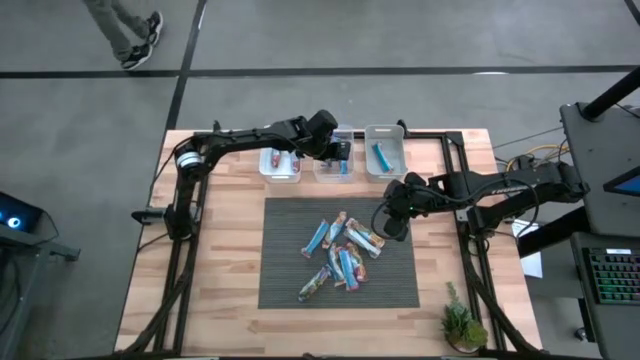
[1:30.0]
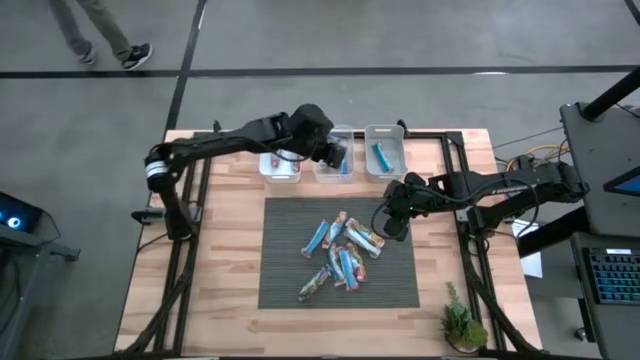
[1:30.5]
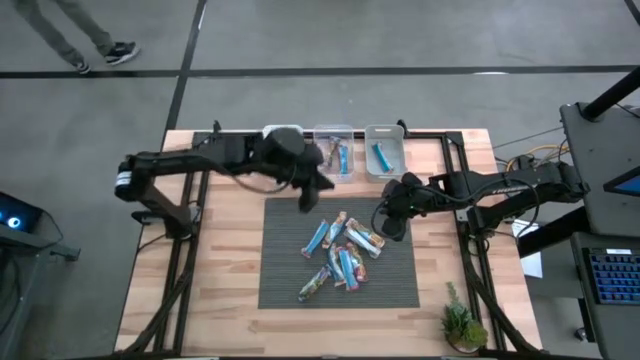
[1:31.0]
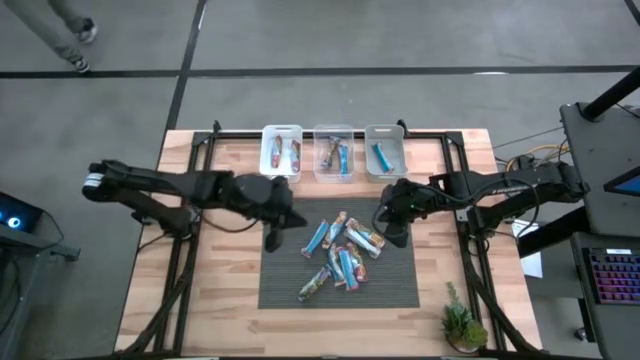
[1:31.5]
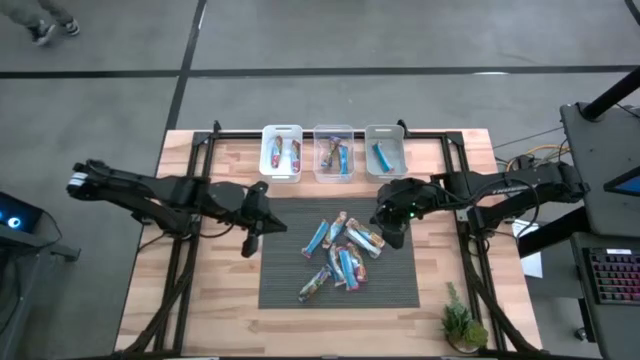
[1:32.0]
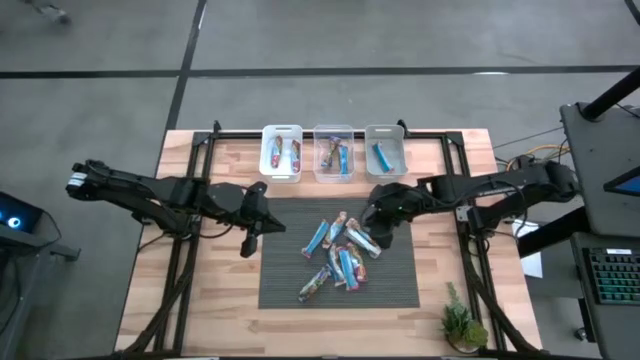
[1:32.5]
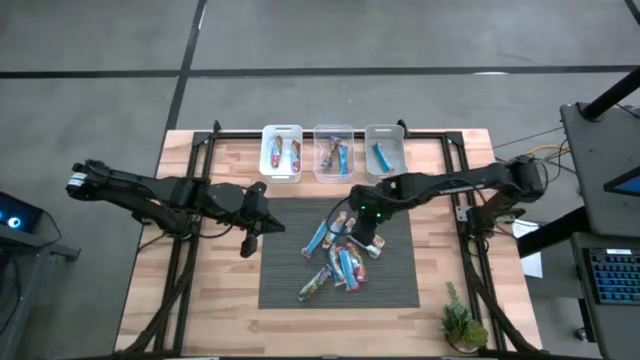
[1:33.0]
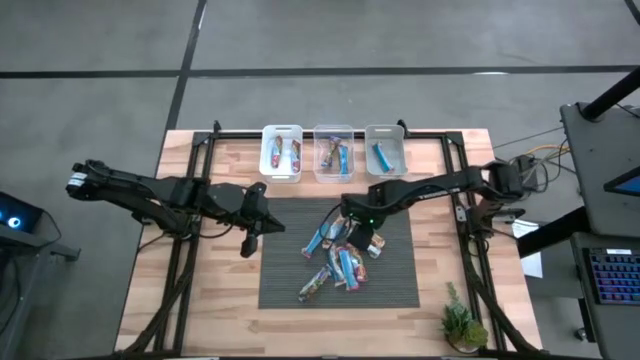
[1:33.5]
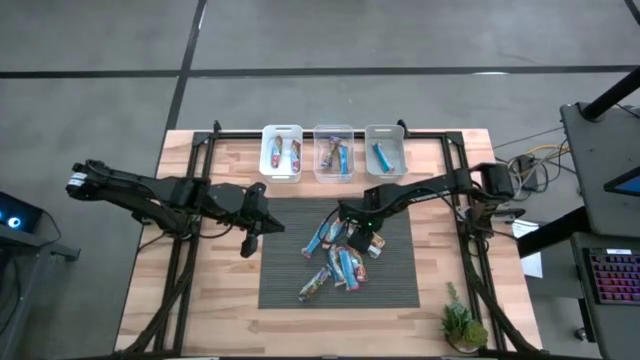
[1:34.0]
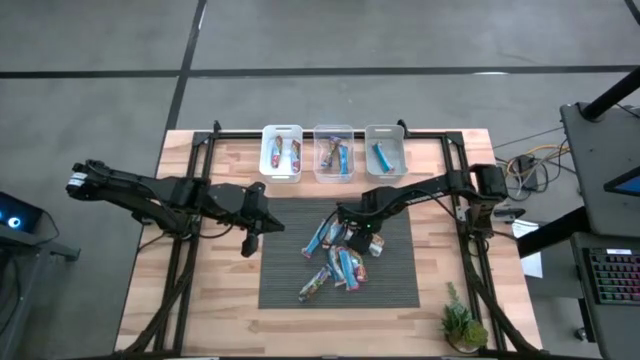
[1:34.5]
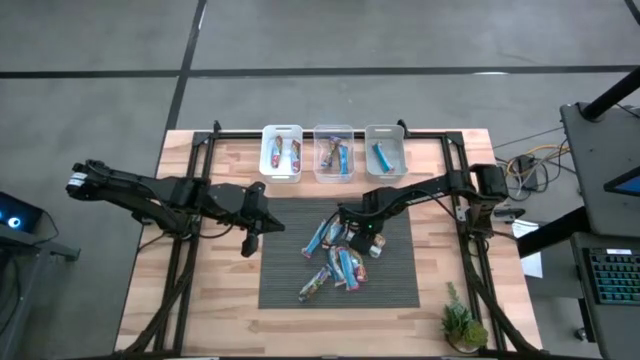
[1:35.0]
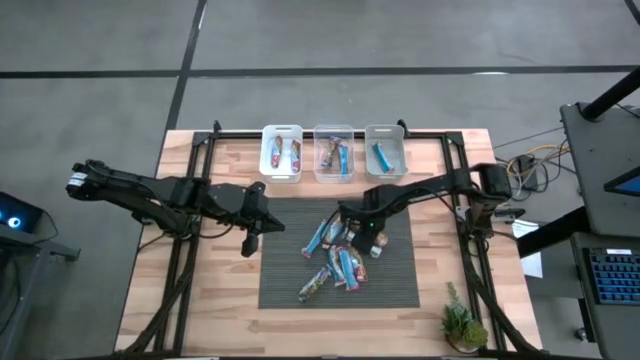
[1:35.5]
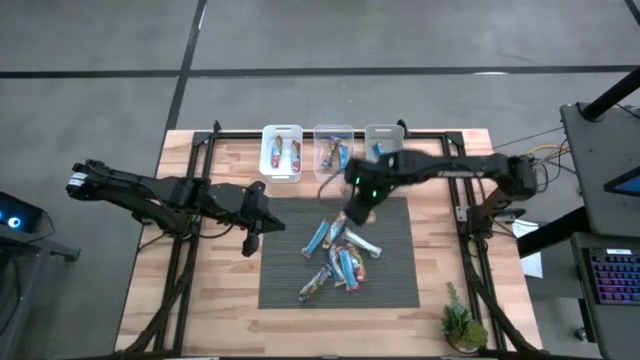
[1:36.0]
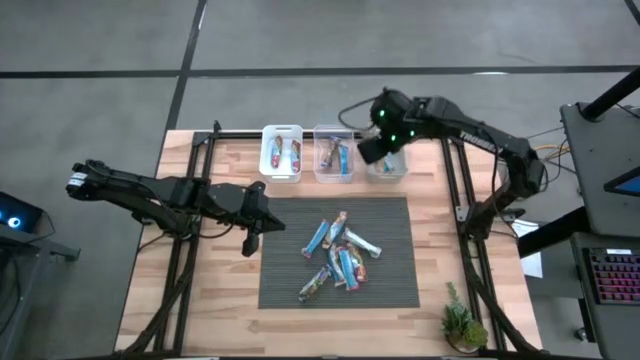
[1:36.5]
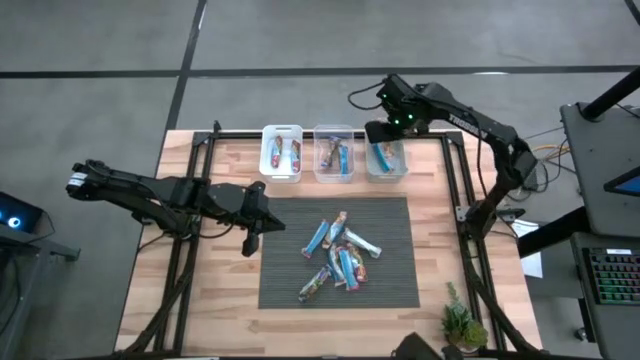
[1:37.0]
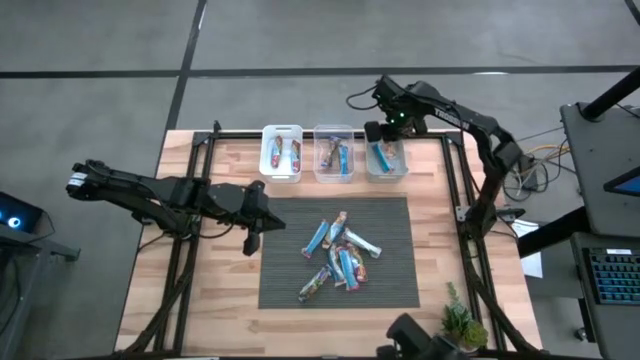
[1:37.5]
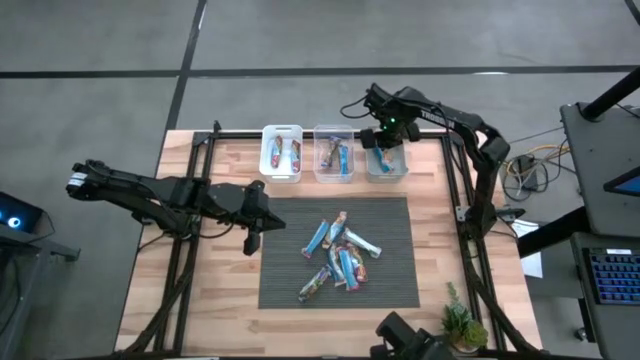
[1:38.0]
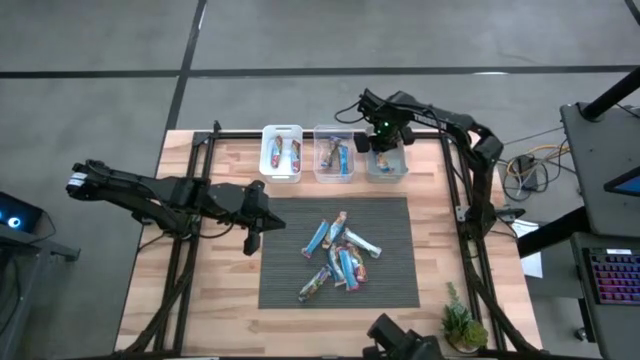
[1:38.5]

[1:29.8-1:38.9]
Task: Pick and place Granola Bars by type
Put the yellow granola bar into the gray bin

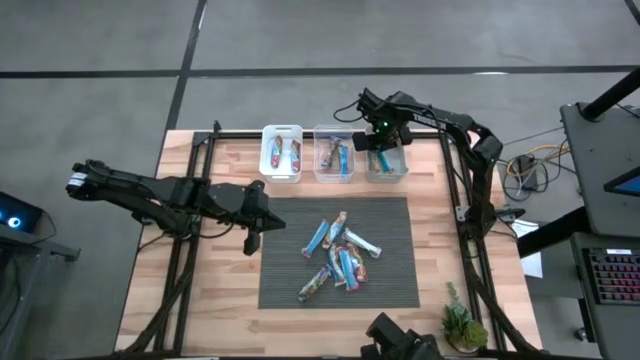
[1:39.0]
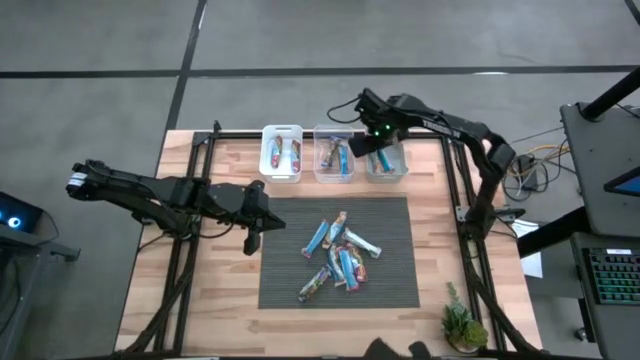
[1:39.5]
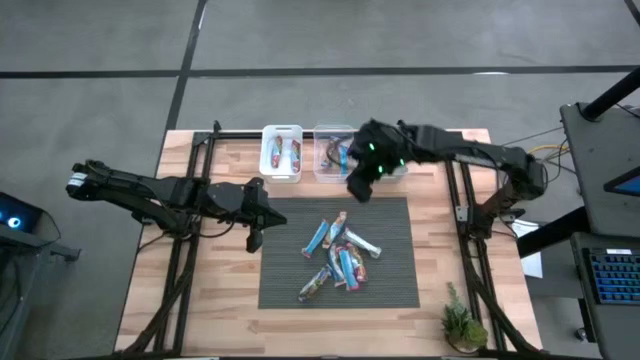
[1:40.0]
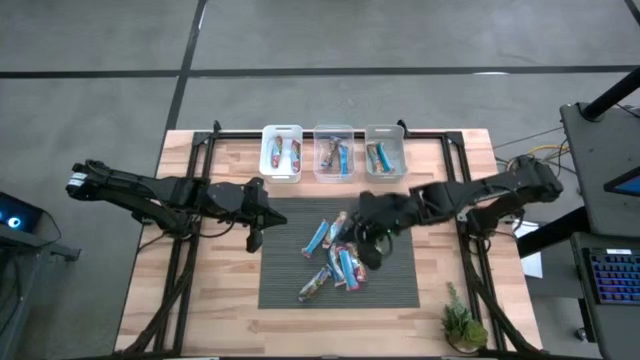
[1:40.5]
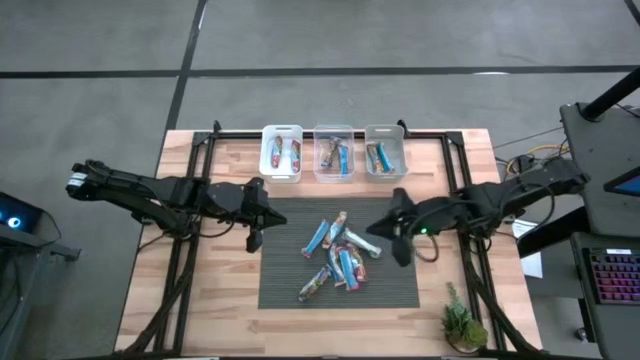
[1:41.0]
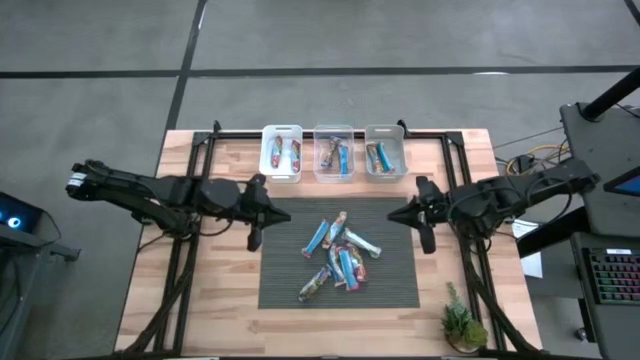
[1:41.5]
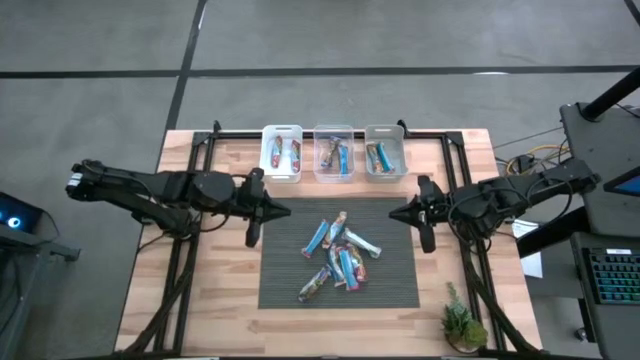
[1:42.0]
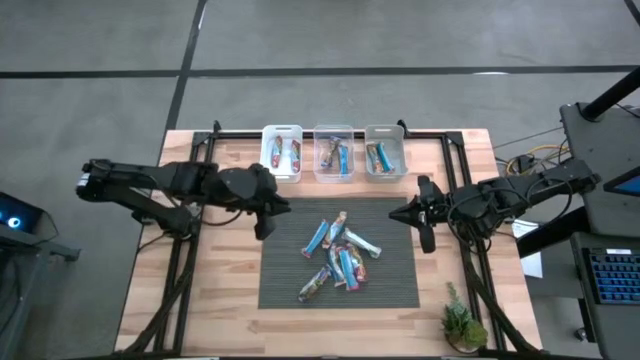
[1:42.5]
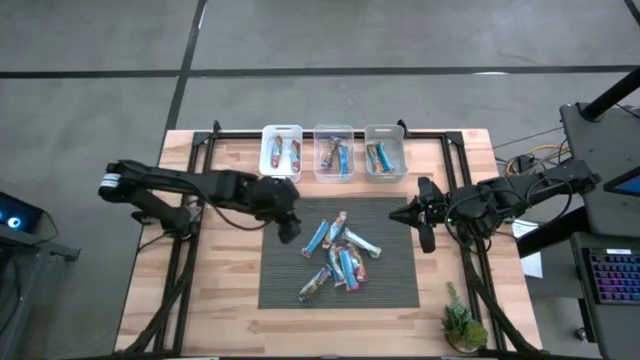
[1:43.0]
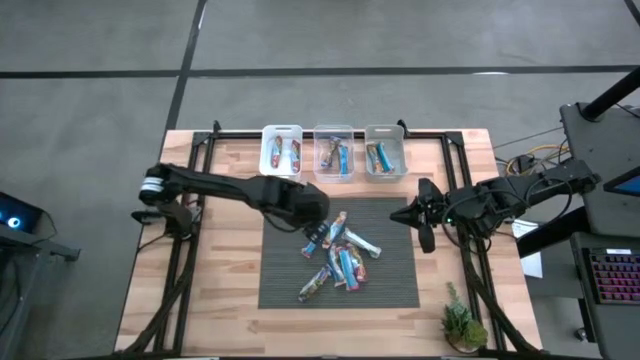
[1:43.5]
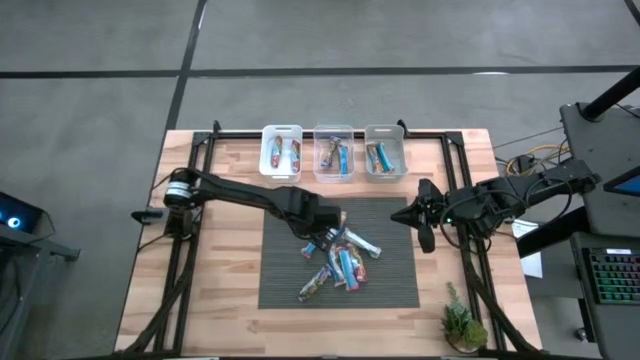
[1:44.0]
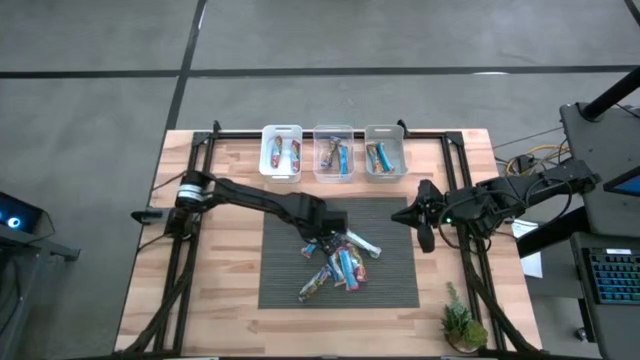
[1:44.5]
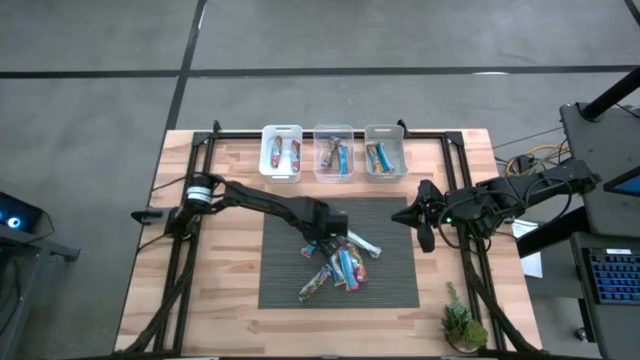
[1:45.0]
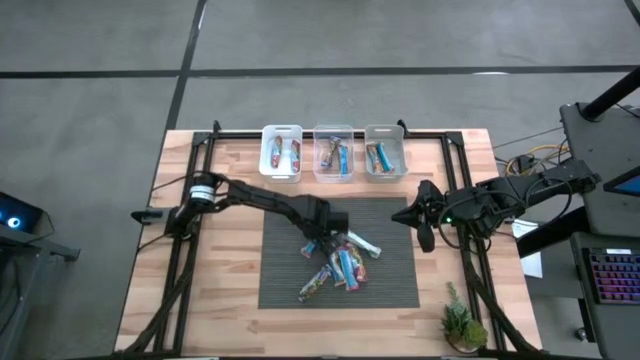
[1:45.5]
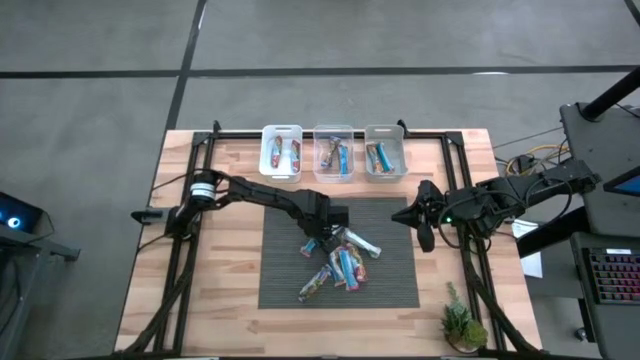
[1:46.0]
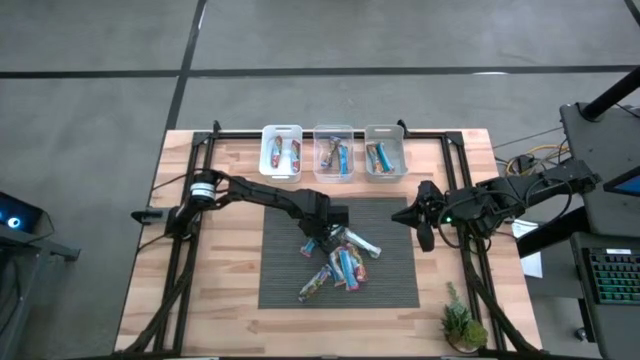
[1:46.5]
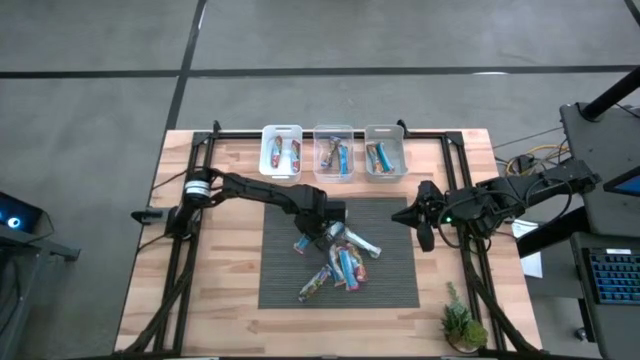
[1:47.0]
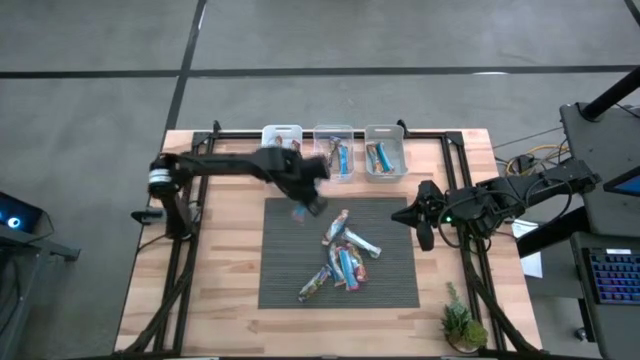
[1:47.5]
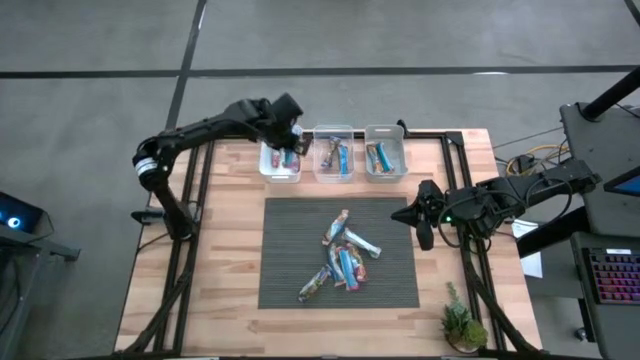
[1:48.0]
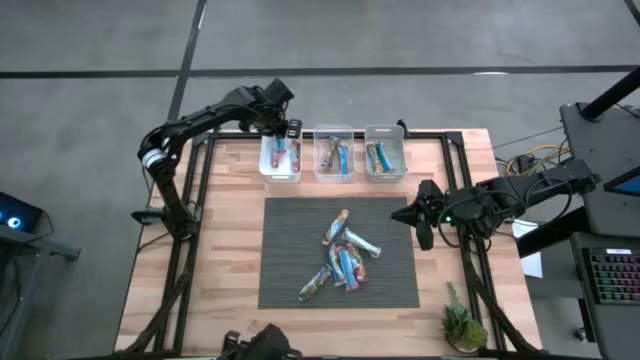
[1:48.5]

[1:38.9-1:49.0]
Put the red granola bar into the white bin

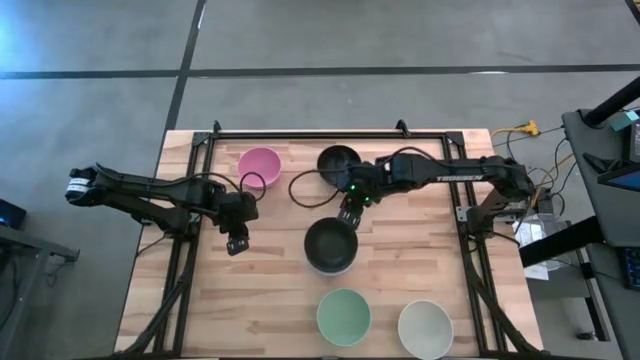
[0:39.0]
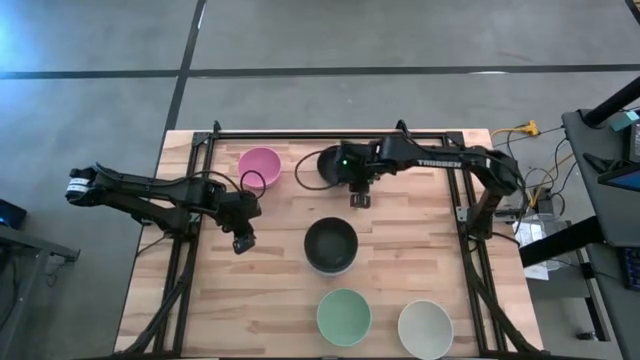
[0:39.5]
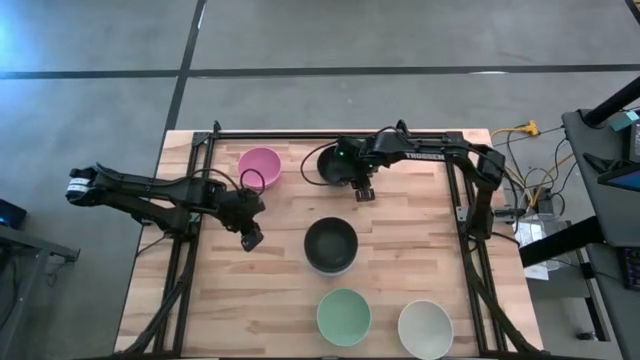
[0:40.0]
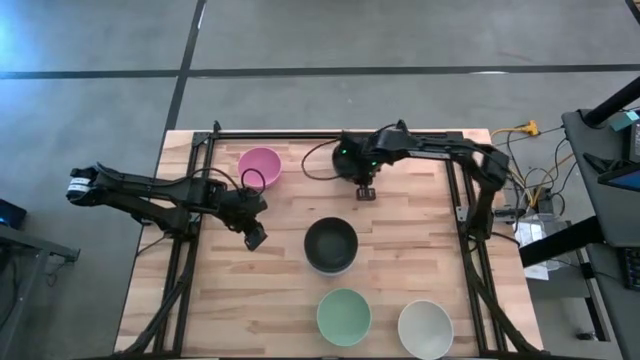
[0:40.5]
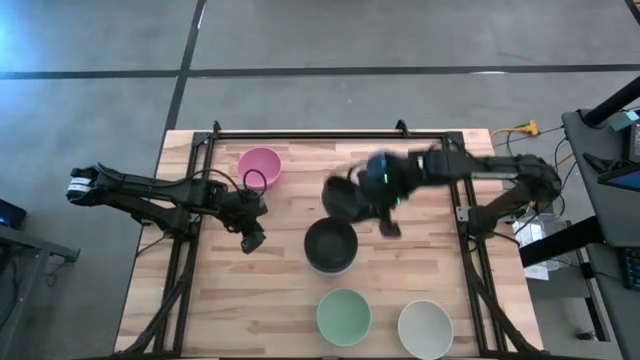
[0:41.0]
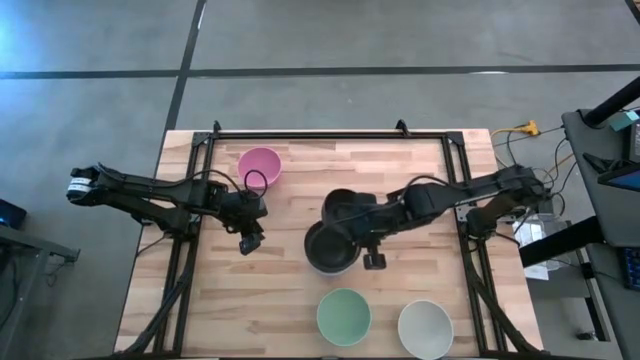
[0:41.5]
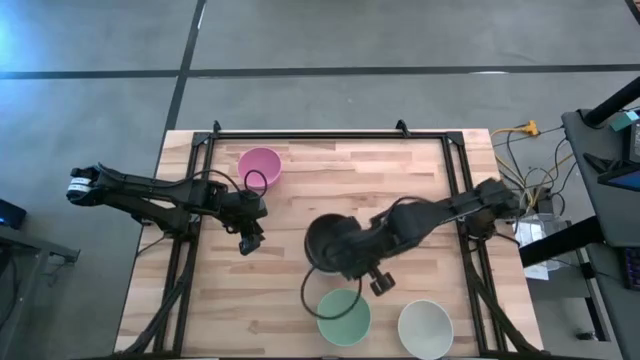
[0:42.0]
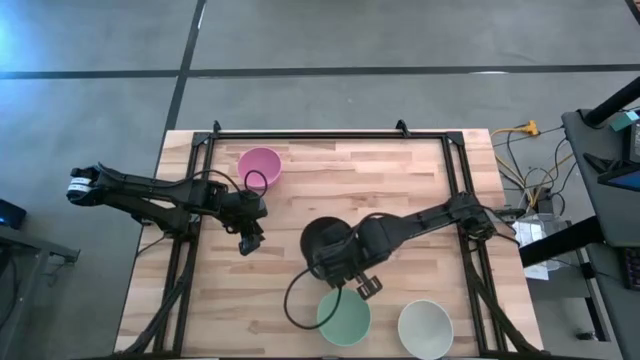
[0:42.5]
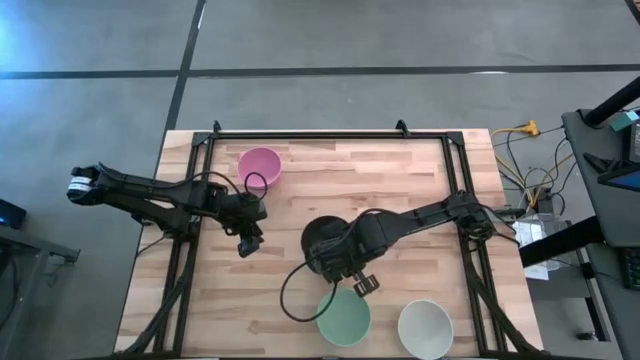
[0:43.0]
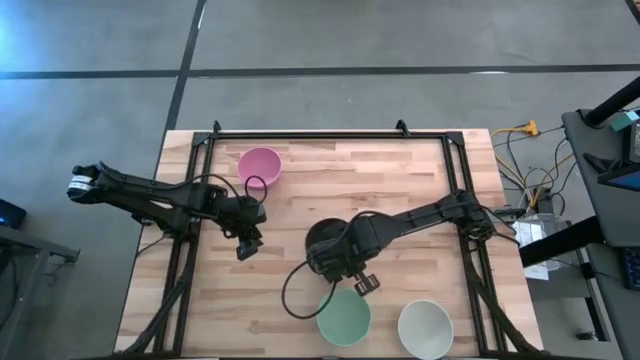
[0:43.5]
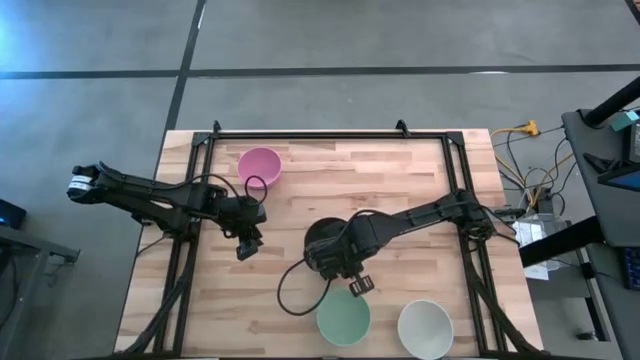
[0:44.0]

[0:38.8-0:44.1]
Task: Nest bowls inside each other
Stack the black bowl on top of the black bowl
